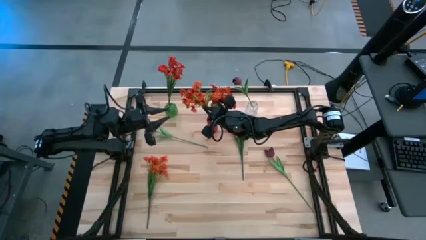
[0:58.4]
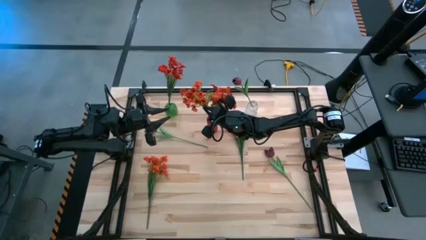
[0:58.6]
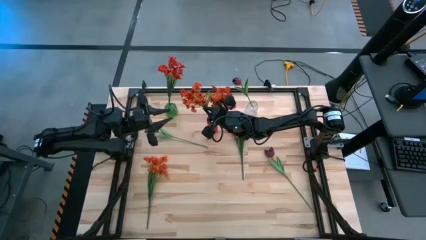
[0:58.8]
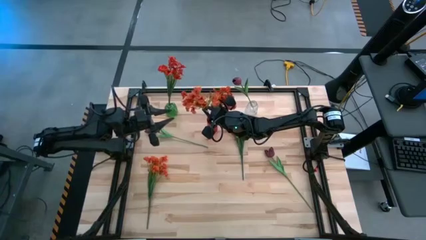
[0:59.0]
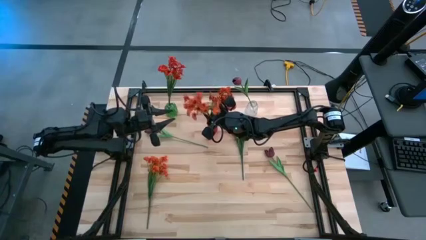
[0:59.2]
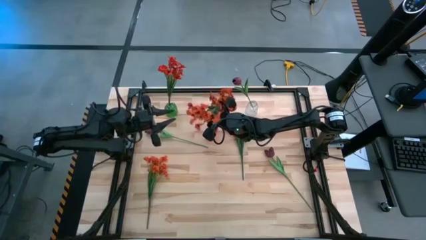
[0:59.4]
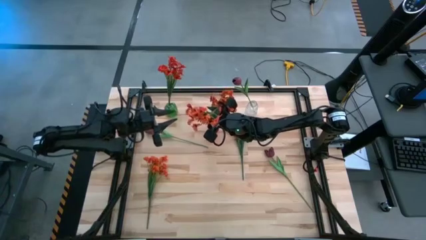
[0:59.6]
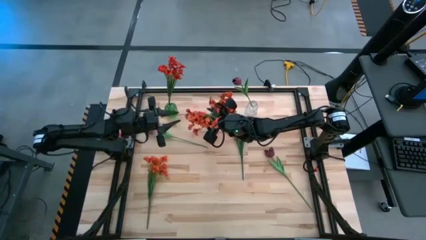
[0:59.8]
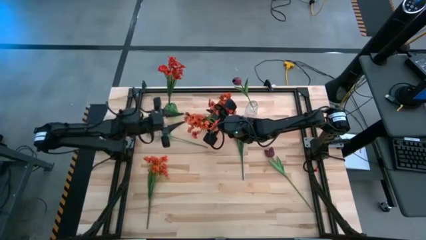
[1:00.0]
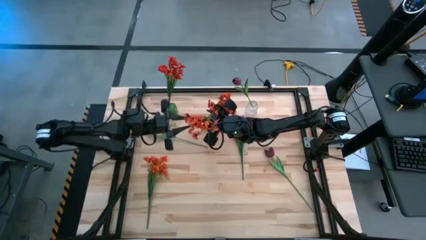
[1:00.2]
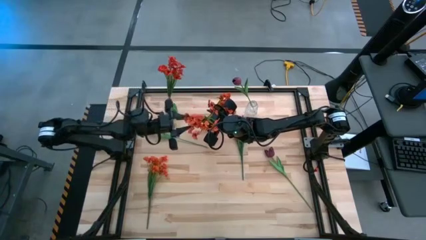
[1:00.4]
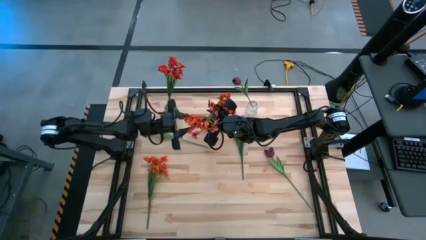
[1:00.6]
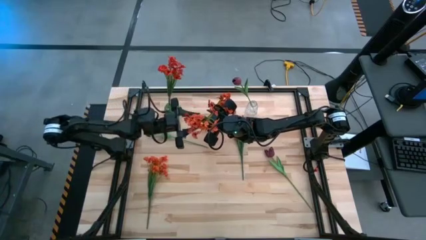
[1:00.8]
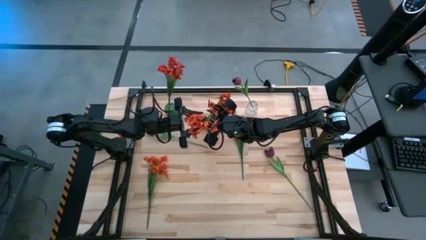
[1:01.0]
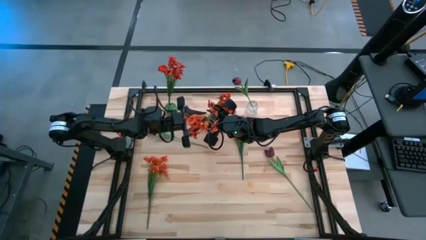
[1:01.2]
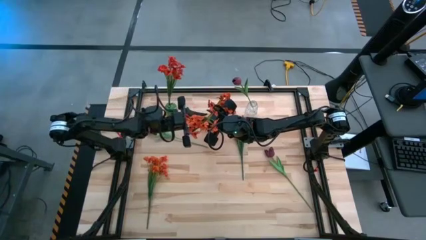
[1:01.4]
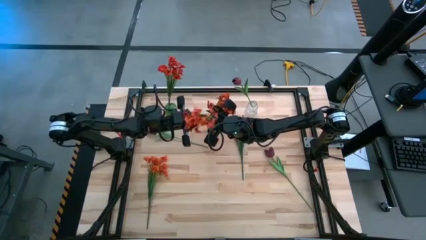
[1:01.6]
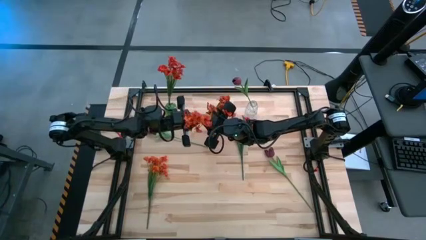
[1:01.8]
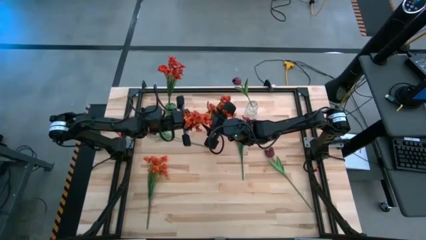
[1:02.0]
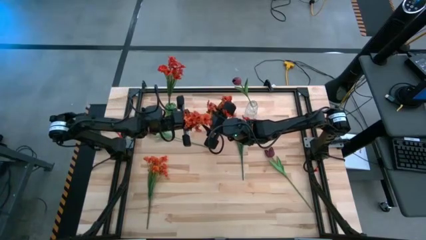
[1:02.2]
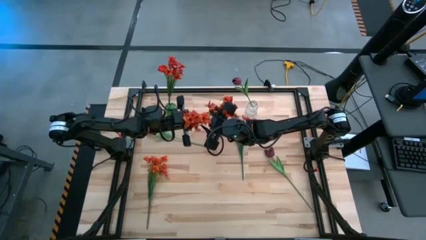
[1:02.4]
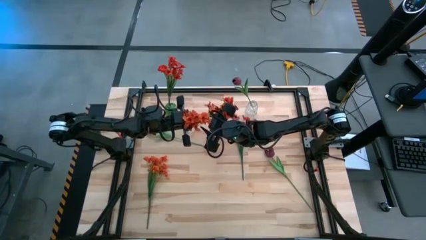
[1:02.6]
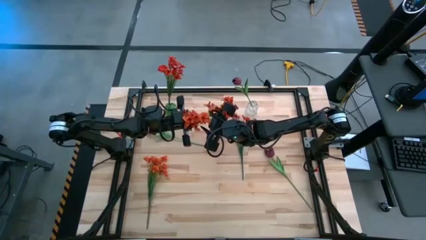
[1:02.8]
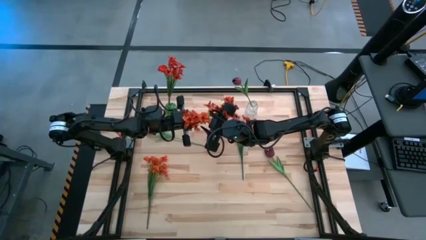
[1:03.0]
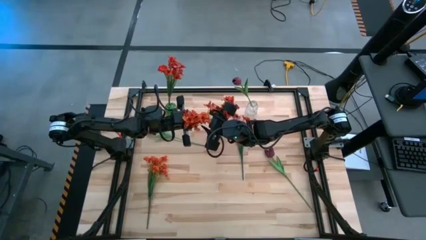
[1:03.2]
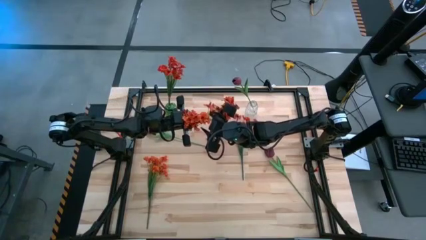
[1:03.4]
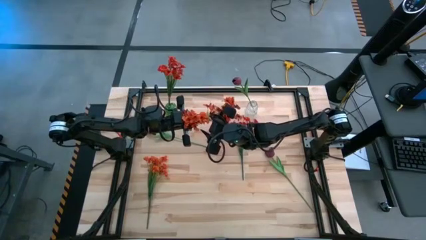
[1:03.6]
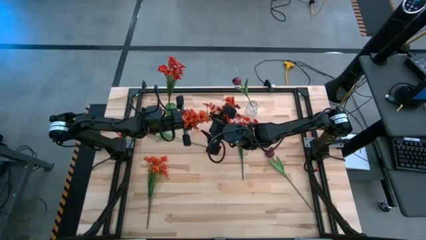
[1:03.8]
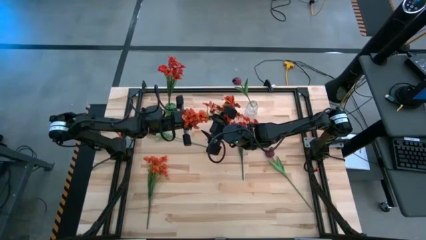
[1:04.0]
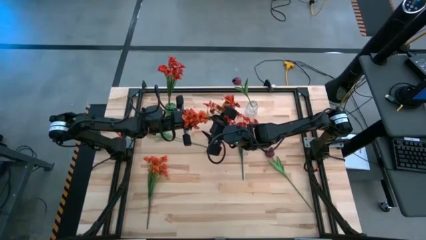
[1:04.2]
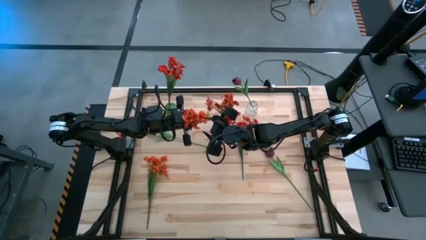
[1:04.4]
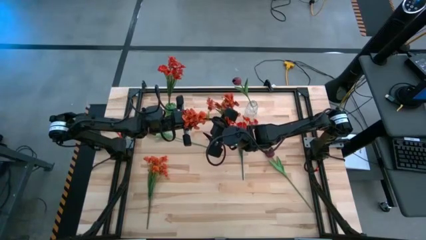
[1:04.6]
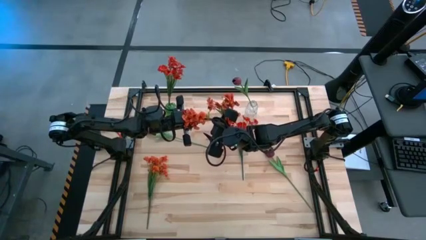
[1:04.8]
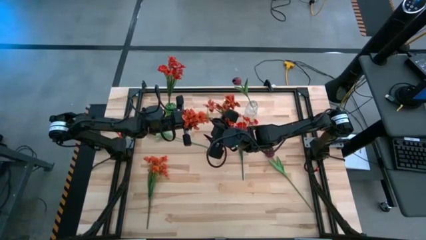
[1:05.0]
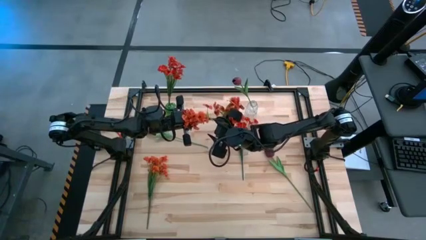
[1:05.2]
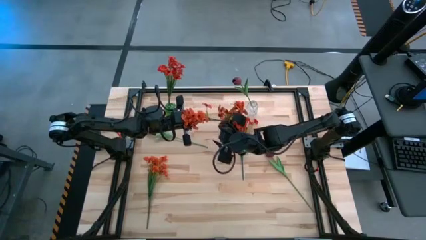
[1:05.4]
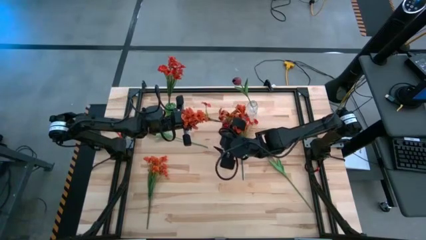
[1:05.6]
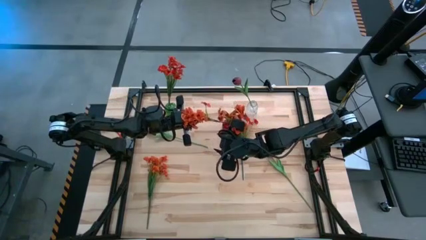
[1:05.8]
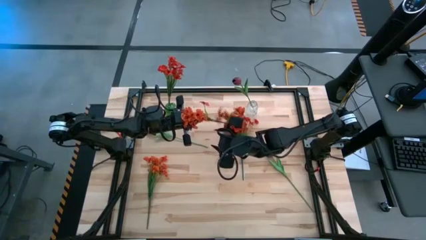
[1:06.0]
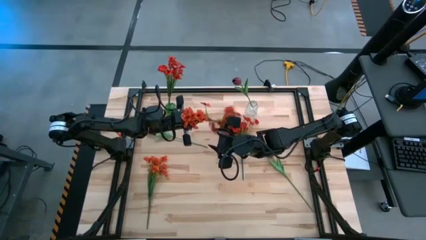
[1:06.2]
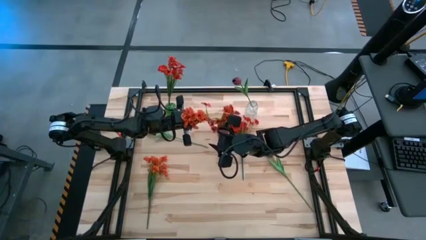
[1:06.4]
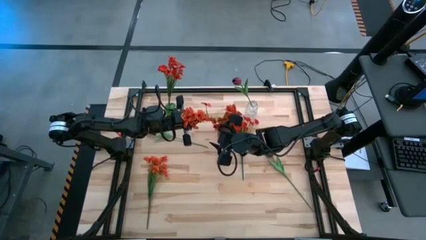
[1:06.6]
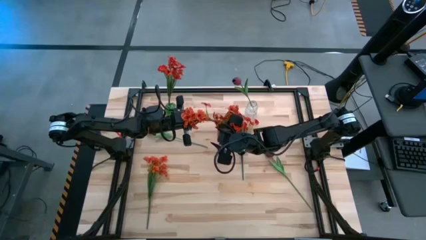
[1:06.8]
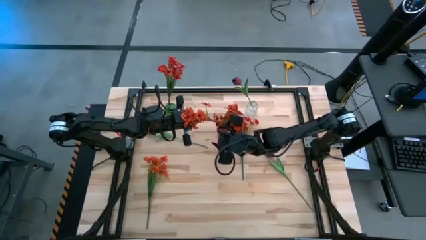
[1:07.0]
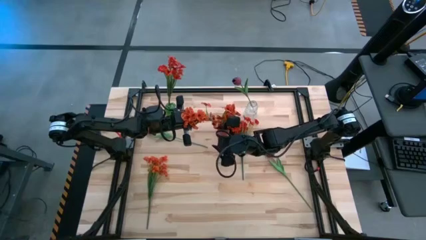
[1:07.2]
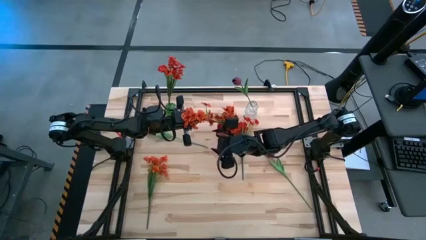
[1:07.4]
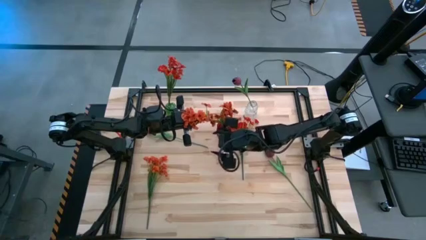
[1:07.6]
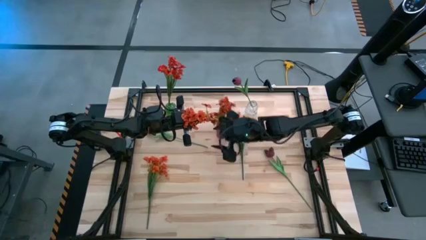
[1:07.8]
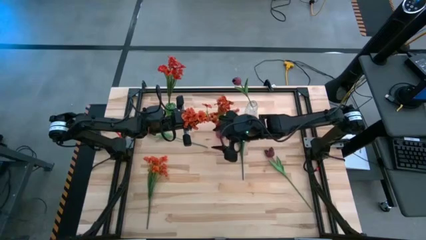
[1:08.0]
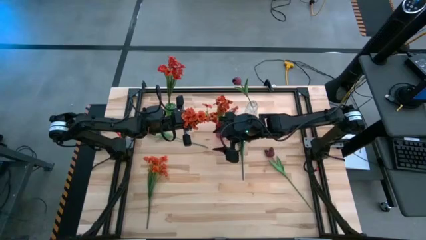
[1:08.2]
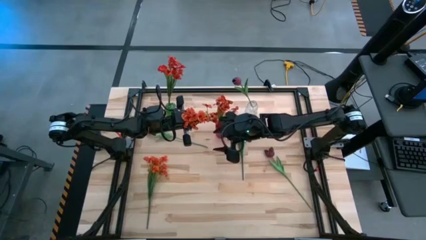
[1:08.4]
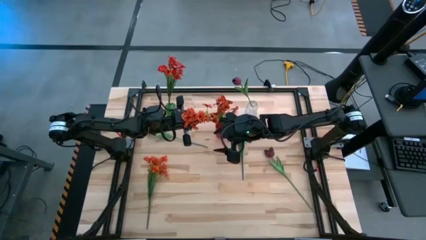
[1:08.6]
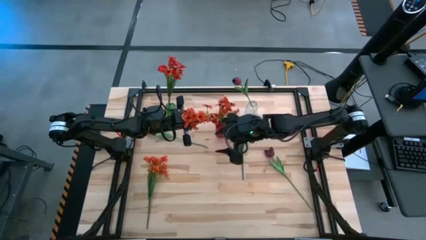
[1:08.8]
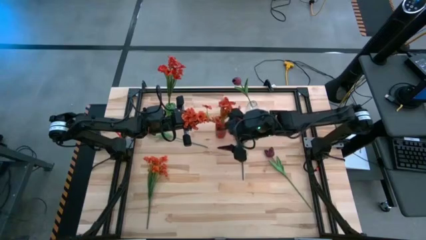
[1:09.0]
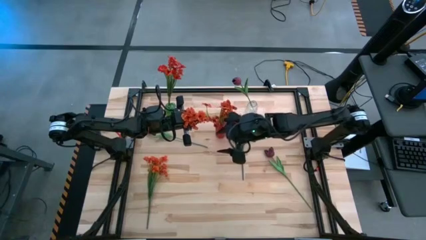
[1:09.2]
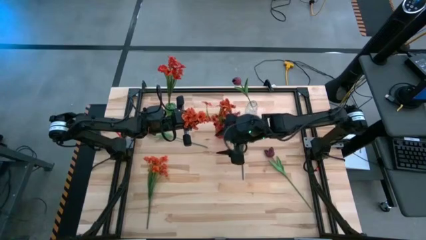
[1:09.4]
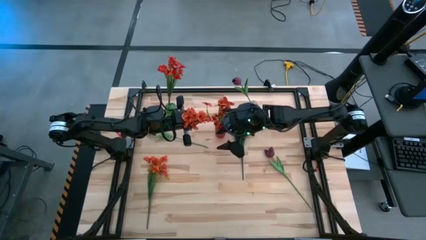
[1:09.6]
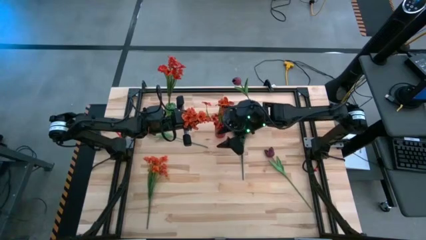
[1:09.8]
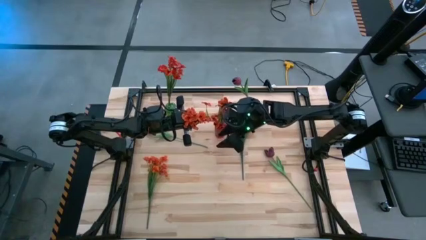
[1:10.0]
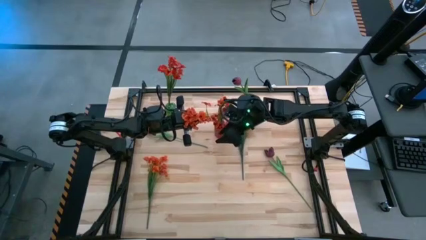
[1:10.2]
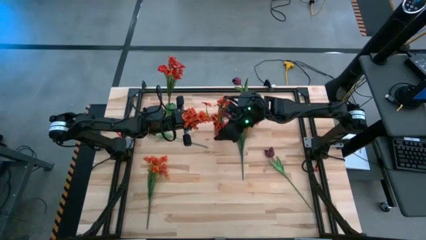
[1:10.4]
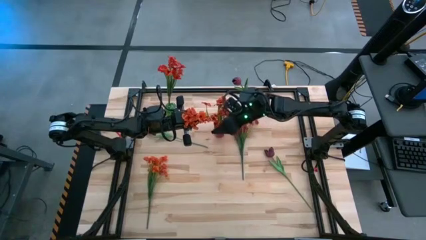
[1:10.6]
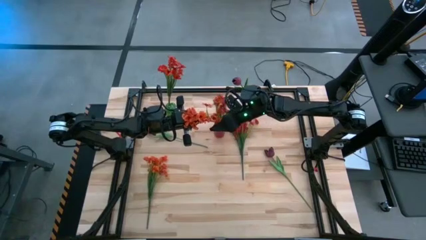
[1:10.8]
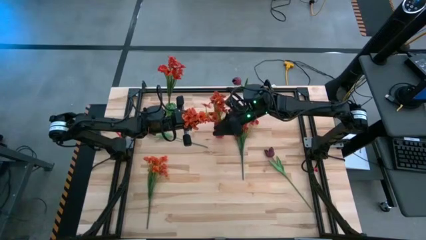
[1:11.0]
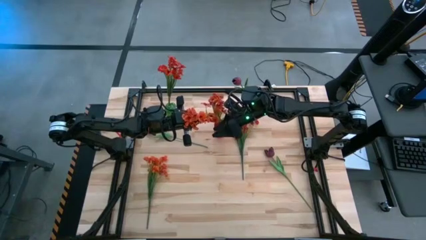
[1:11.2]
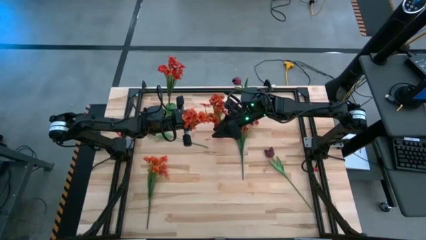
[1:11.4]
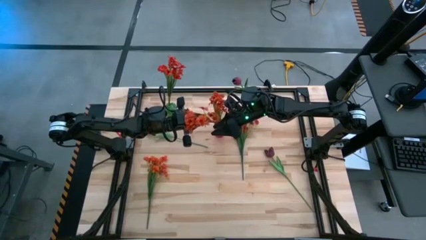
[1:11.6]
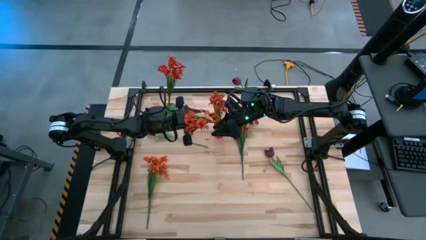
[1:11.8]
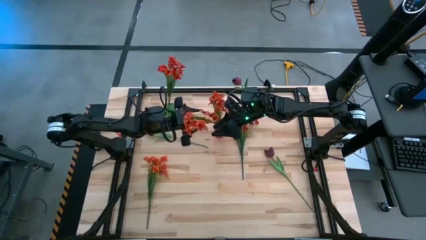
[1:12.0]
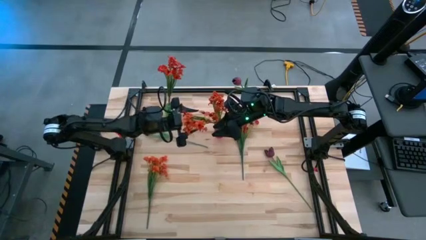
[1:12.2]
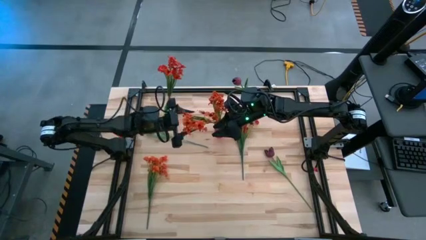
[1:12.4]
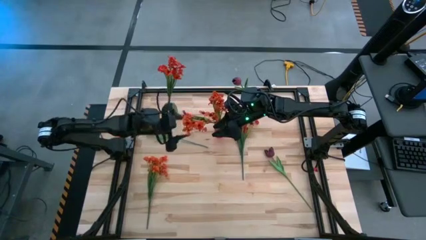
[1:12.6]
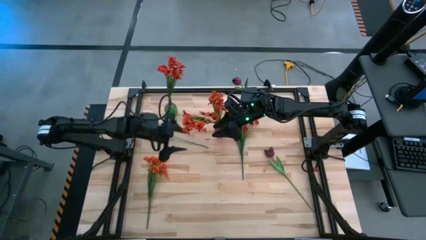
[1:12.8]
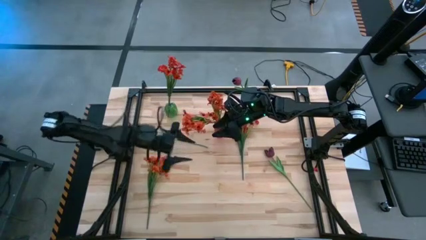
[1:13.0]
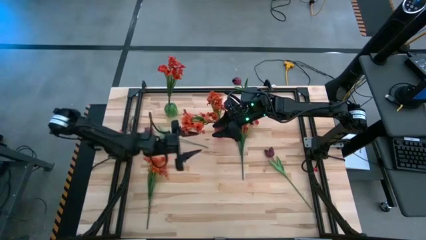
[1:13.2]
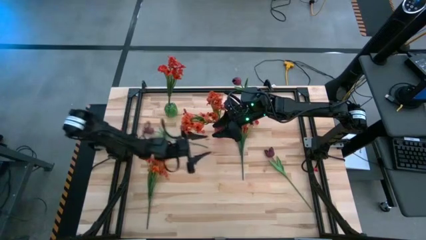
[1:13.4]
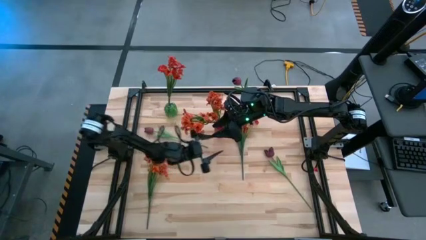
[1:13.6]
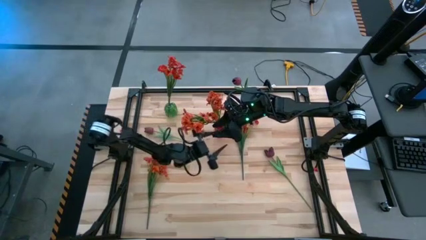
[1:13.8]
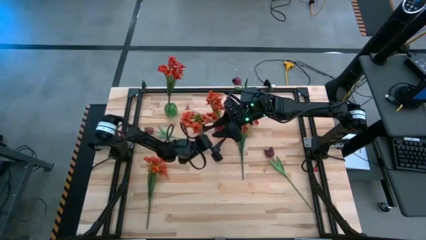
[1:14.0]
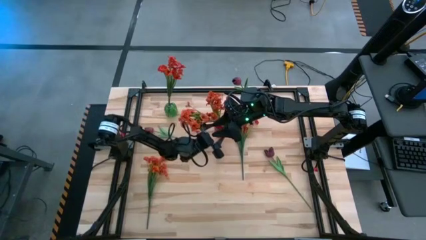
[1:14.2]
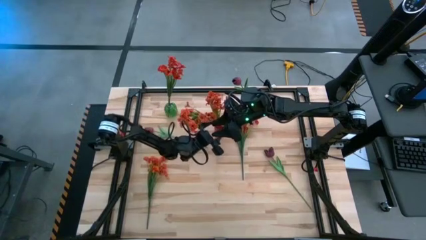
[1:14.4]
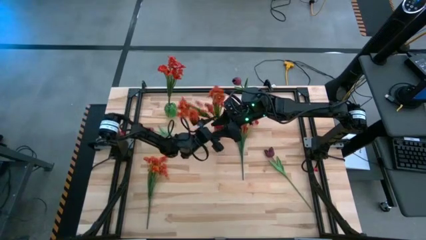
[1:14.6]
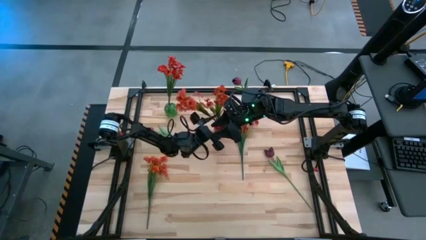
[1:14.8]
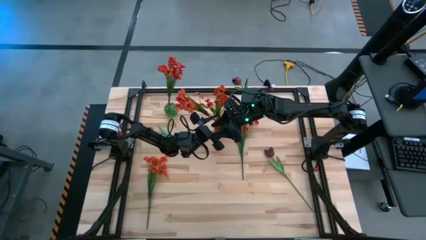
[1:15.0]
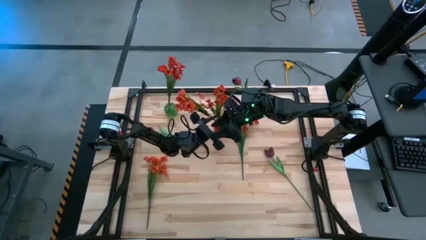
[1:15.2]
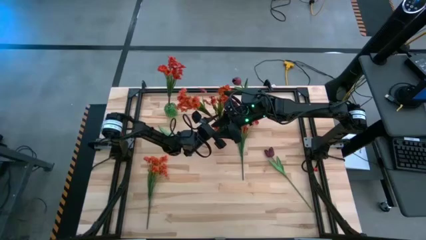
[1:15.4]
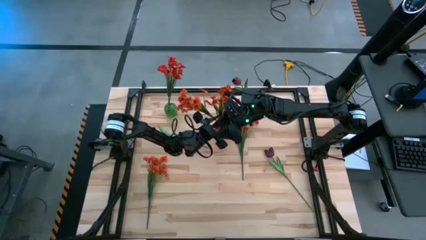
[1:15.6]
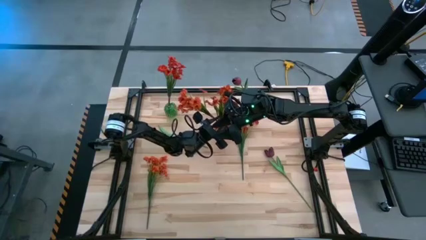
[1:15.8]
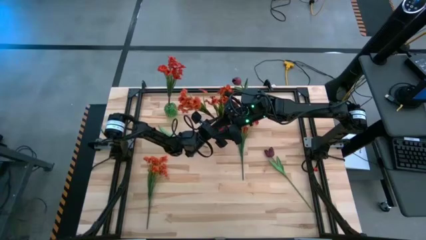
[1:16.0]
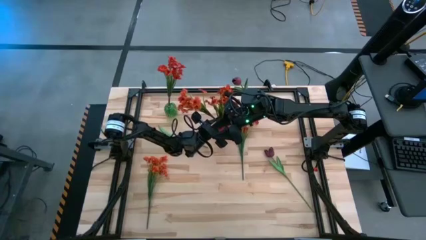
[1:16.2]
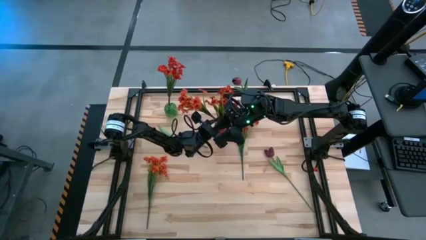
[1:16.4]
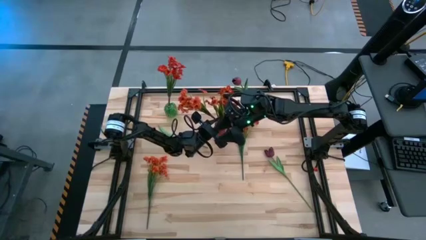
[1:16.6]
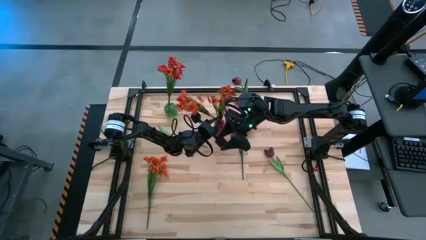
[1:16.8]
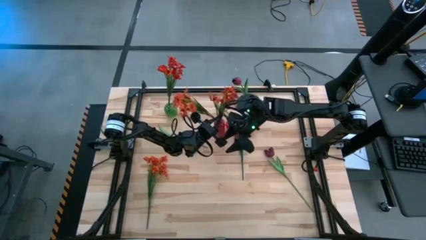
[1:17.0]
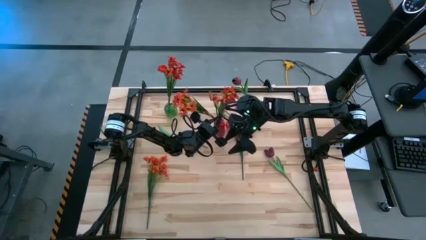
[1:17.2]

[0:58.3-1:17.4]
Task: Sort flowers into vase by color
Put the top orange flowers into the red vase
